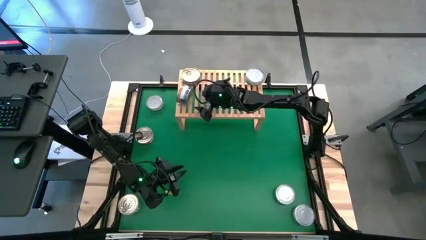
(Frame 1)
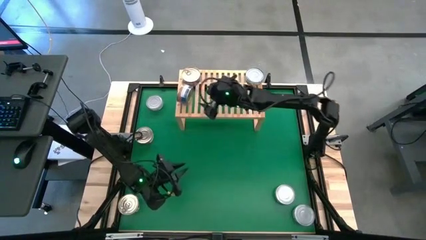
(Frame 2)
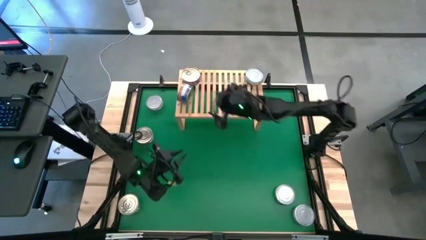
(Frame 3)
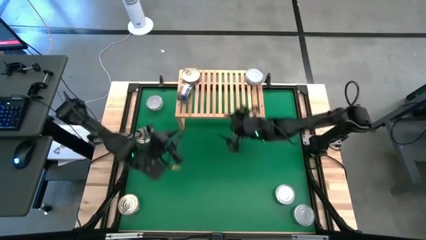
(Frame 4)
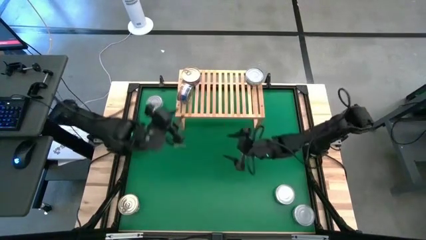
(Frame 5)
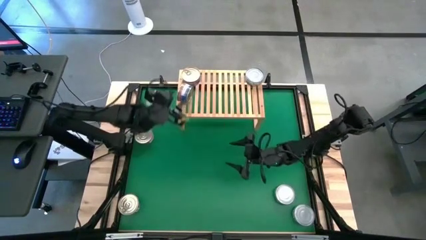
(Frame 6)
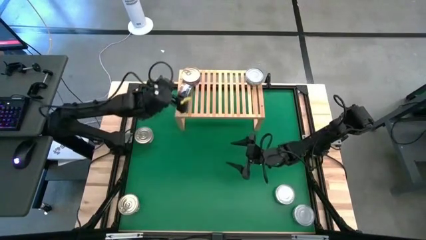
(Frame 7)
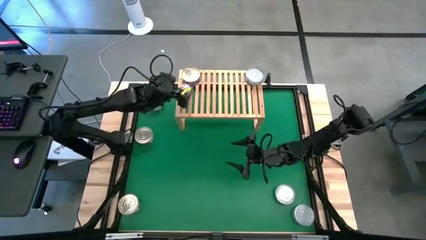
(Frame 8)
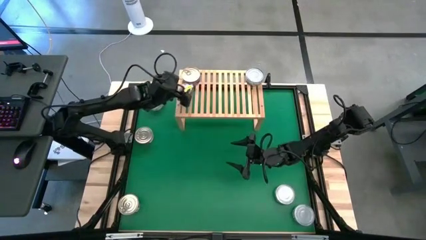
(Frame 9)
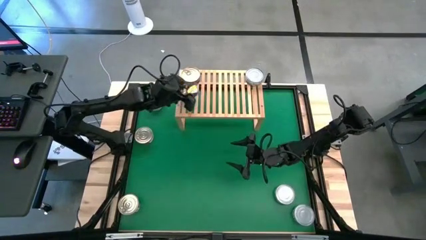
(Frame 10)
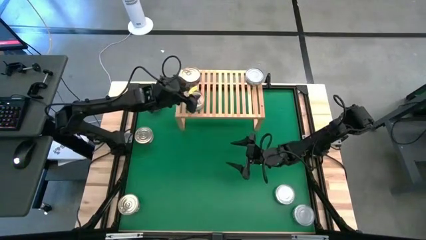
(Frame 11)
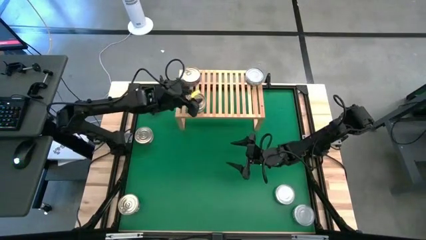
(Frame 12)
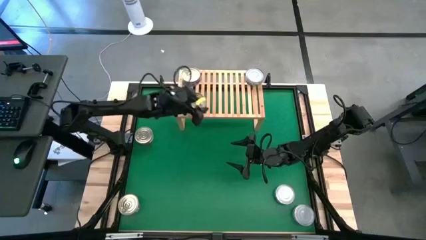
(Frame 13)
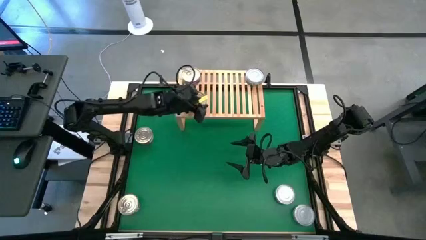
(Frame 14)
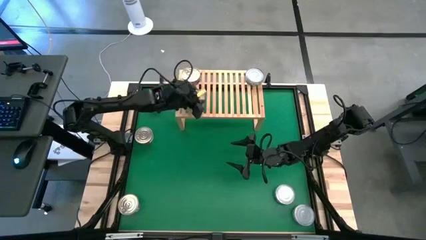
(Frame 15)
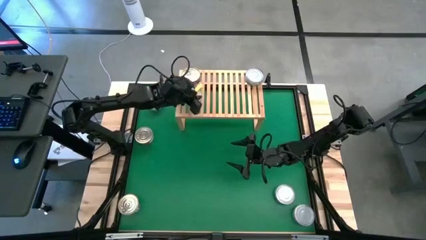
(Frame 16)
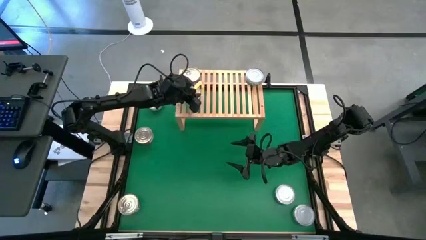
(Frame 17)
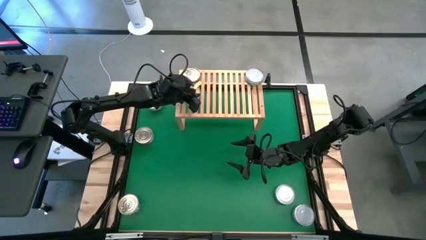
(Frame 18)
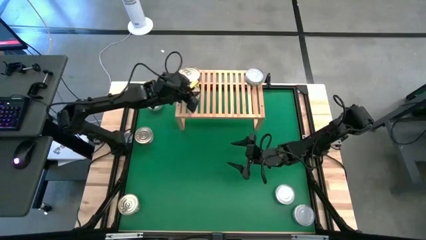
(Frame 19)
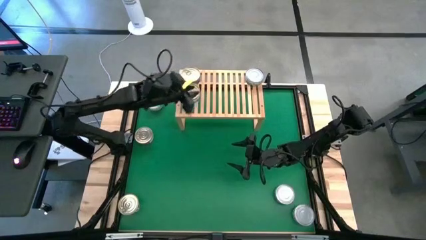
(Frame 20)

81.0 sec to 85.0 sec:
Task: Stack canned seafood by type on shelf
Adjust the blue tuna can

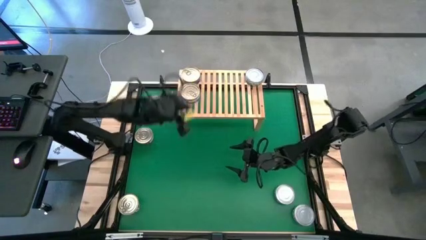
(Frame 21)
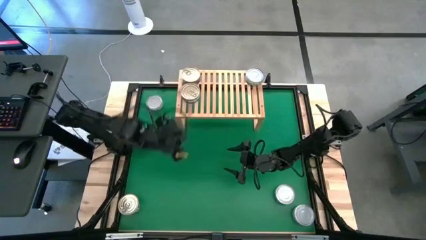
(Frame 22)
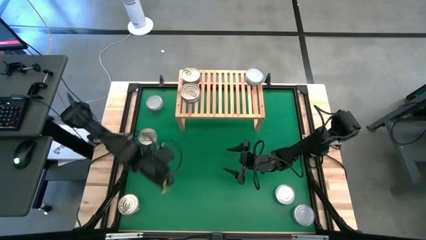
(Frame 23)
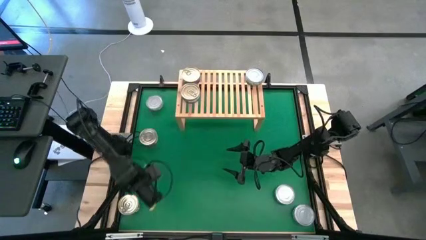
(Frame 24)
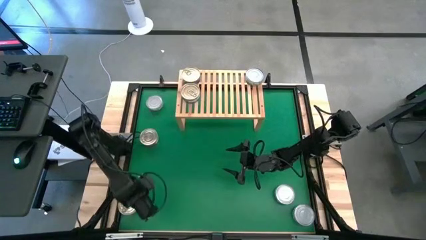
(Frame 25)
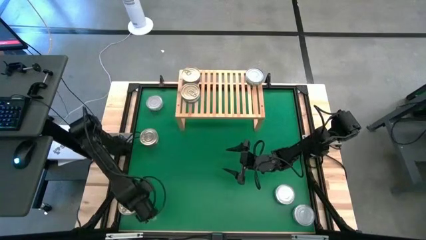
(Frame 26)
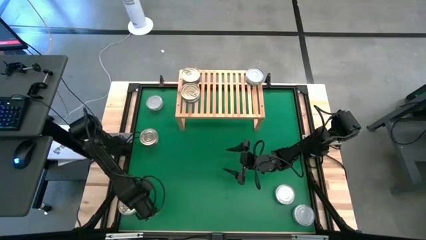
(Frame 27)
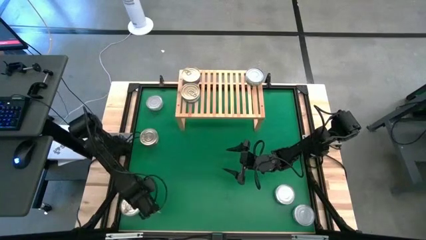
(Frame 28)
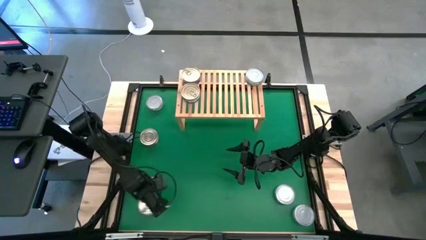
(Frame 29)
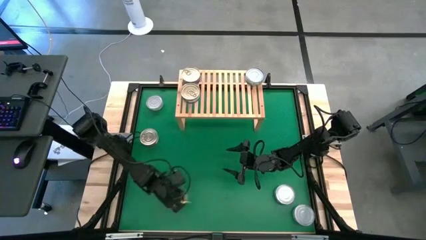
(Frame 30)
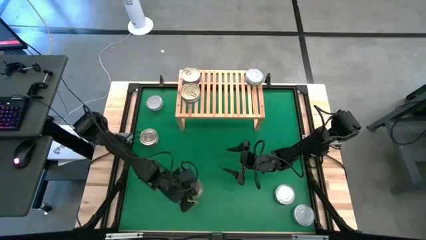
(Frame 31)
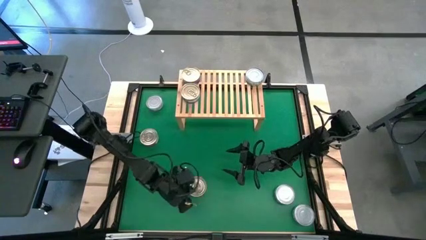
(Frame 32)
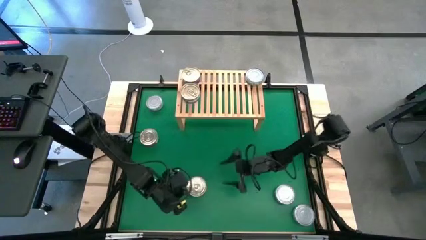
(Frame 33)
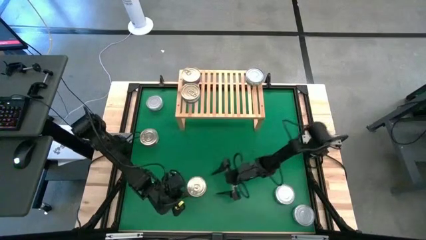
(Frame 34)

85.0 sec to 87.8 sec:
Move the bottom left blue tuna can to the bottom middle of the table

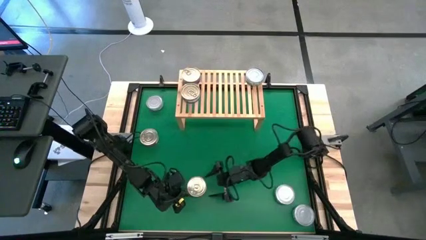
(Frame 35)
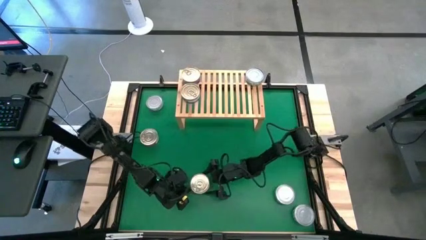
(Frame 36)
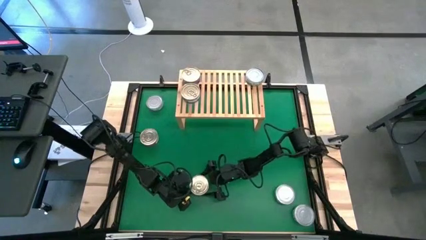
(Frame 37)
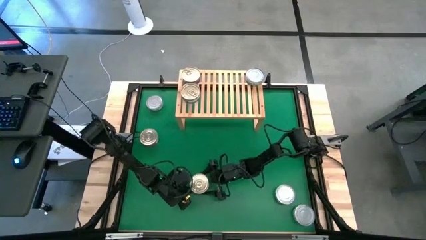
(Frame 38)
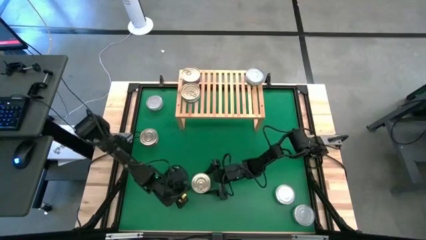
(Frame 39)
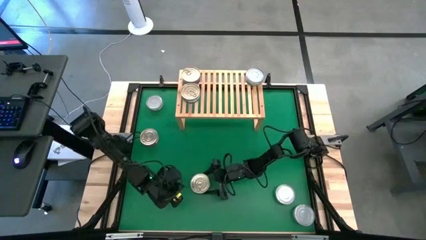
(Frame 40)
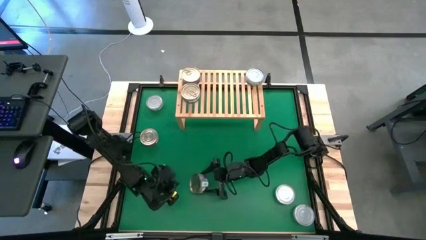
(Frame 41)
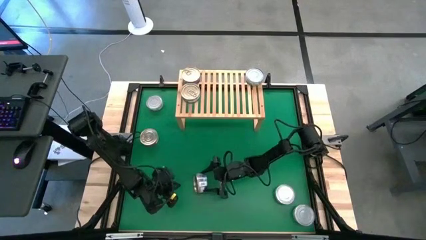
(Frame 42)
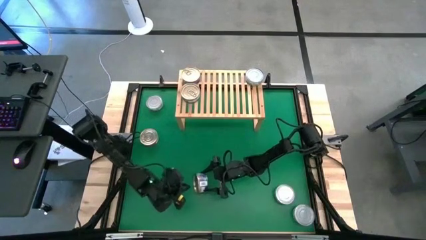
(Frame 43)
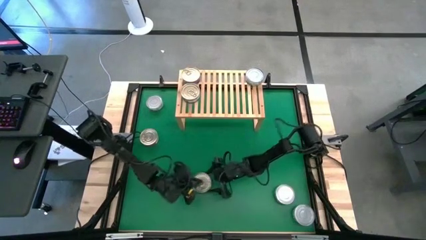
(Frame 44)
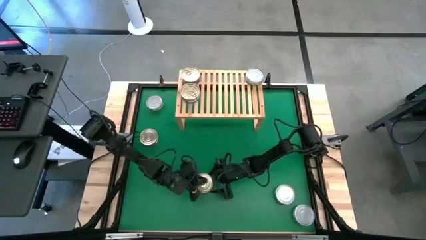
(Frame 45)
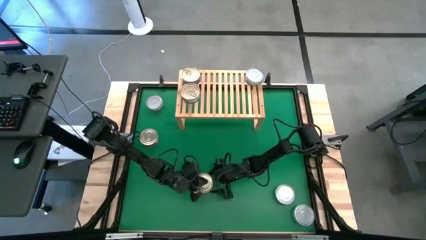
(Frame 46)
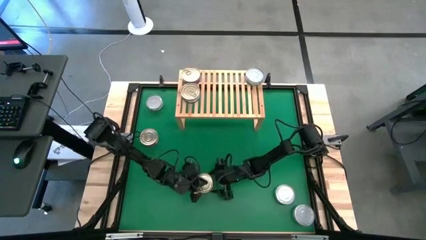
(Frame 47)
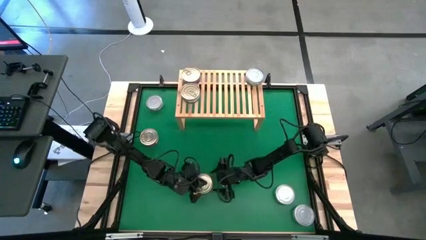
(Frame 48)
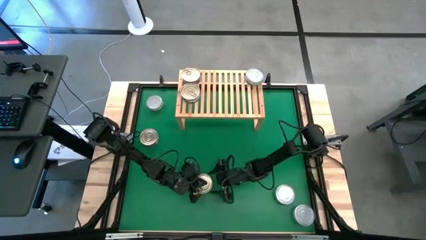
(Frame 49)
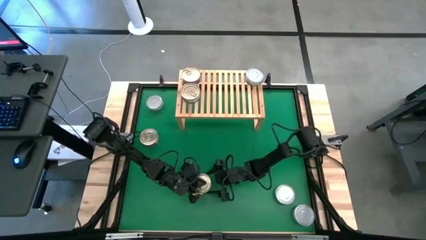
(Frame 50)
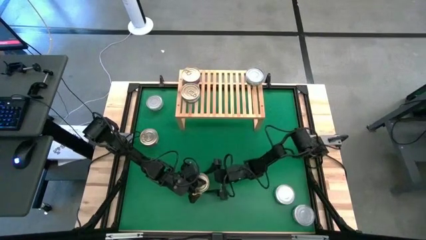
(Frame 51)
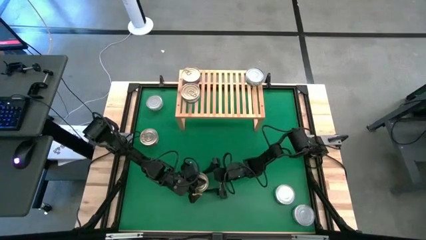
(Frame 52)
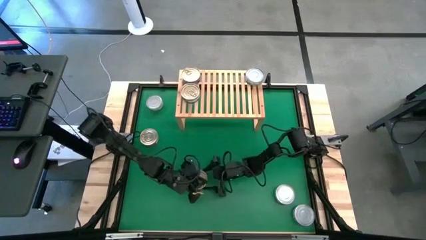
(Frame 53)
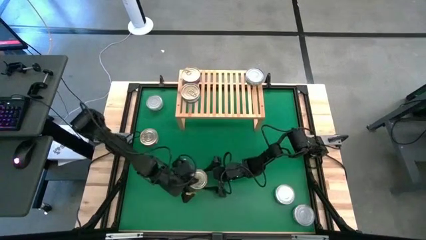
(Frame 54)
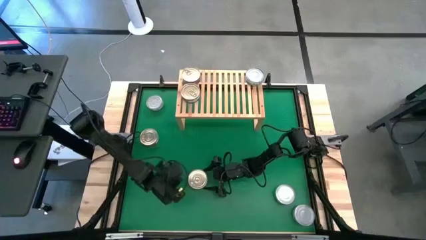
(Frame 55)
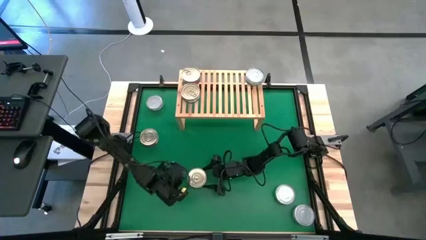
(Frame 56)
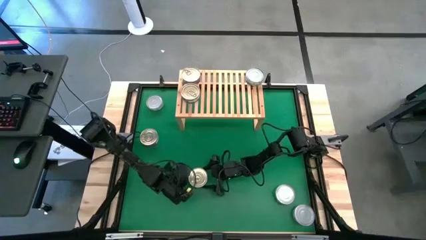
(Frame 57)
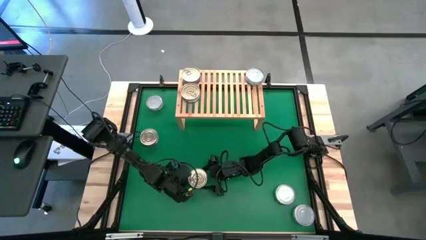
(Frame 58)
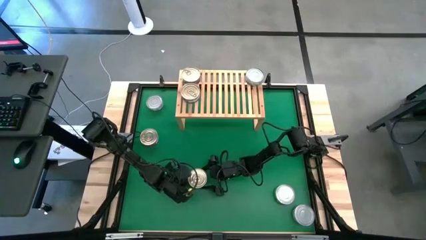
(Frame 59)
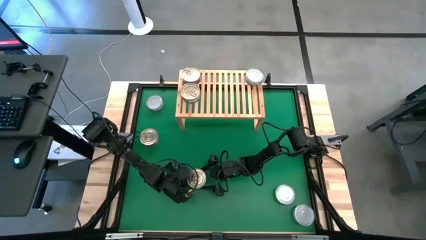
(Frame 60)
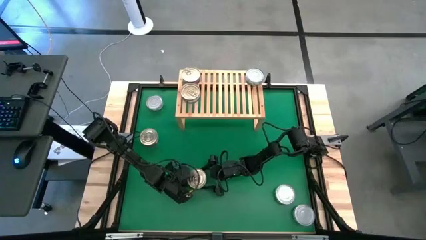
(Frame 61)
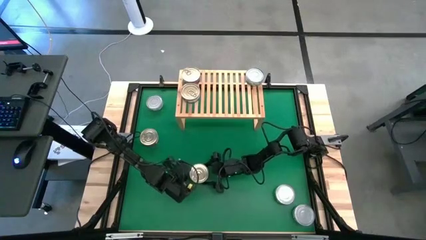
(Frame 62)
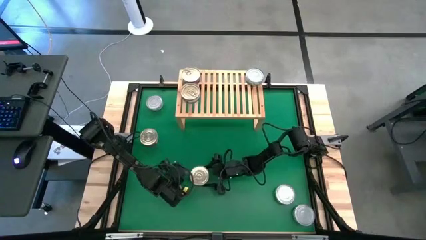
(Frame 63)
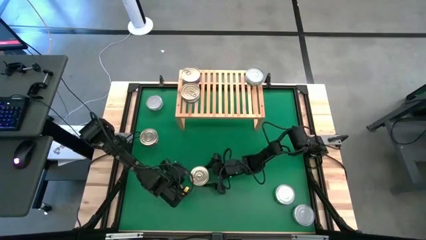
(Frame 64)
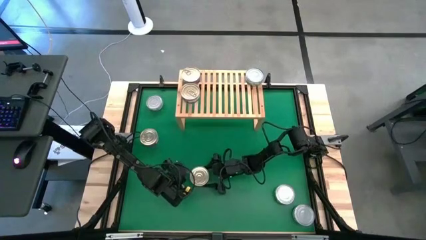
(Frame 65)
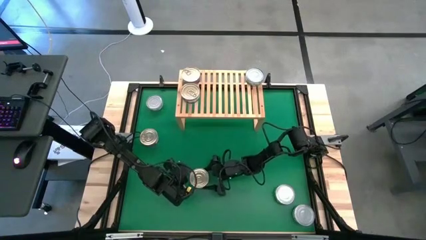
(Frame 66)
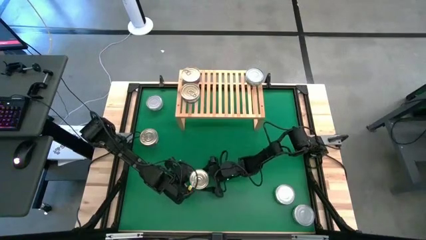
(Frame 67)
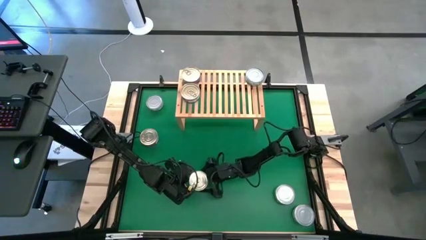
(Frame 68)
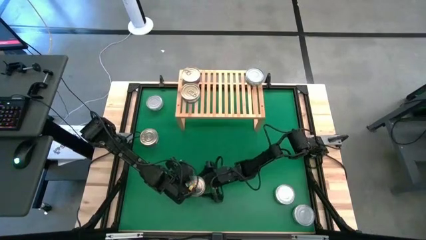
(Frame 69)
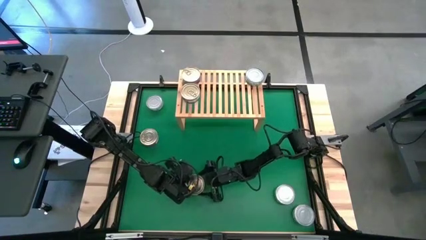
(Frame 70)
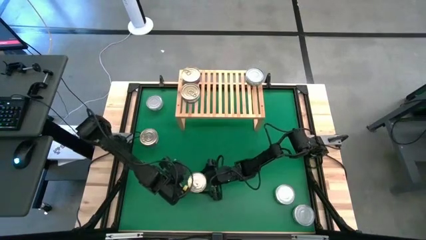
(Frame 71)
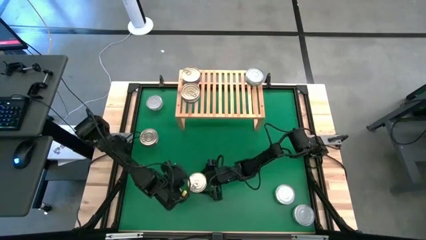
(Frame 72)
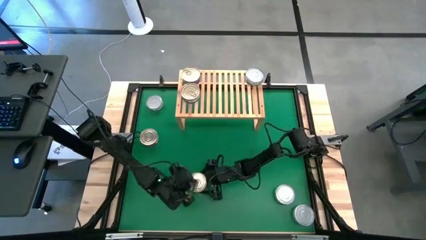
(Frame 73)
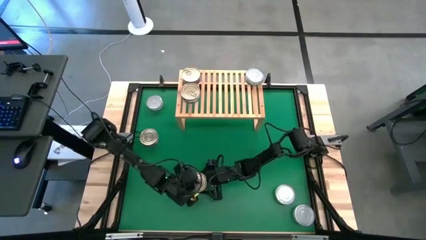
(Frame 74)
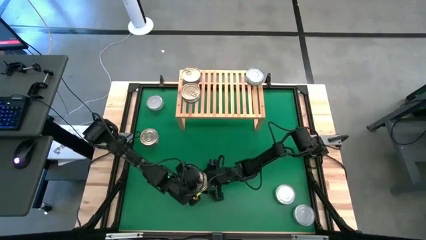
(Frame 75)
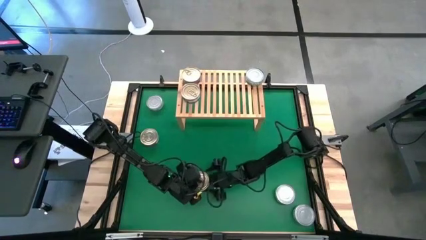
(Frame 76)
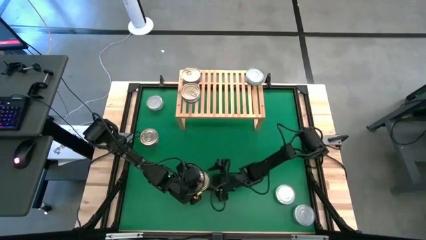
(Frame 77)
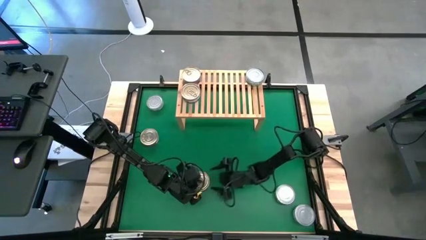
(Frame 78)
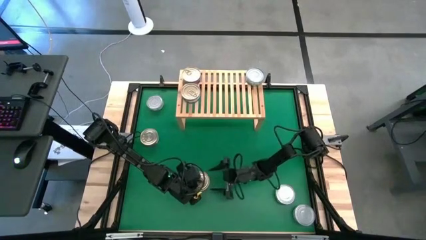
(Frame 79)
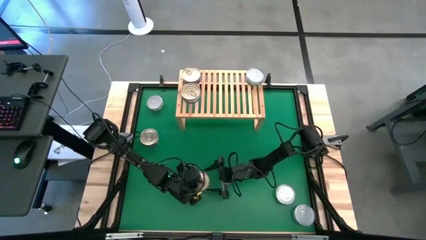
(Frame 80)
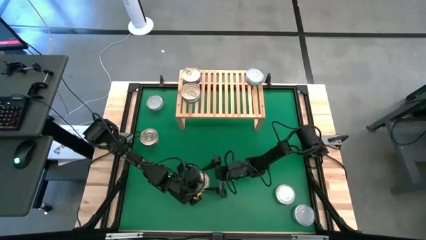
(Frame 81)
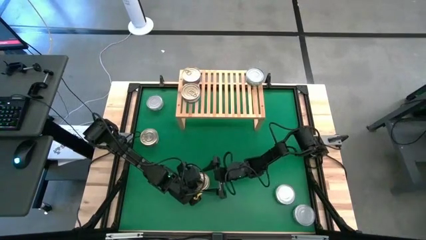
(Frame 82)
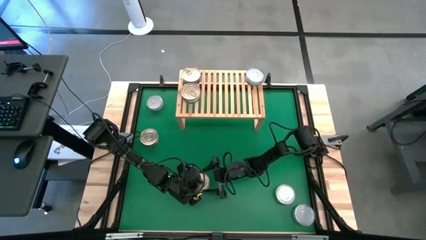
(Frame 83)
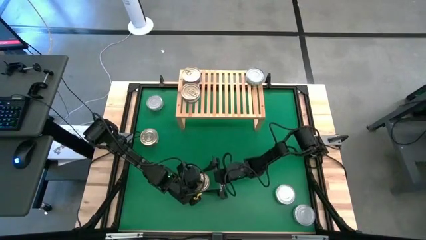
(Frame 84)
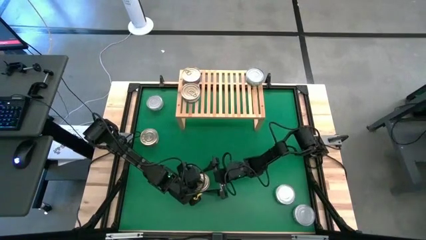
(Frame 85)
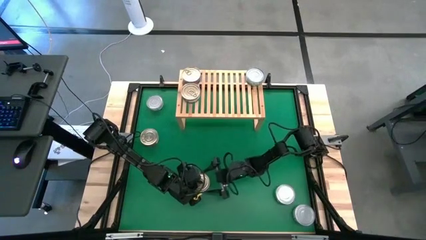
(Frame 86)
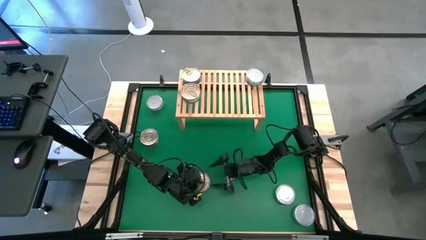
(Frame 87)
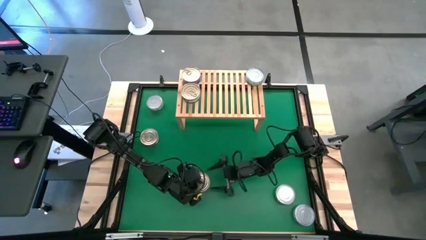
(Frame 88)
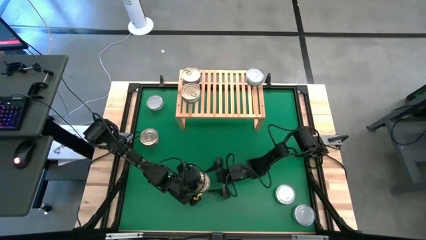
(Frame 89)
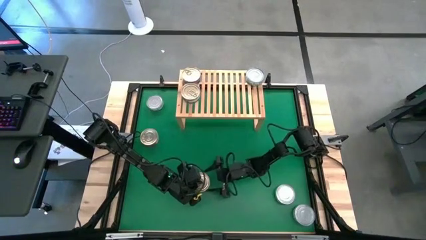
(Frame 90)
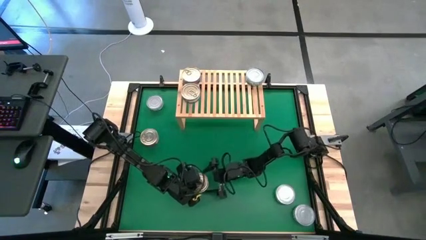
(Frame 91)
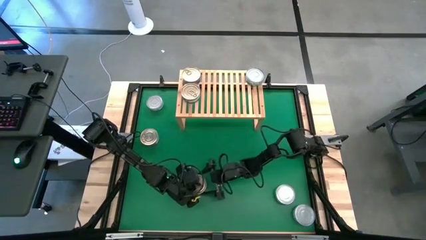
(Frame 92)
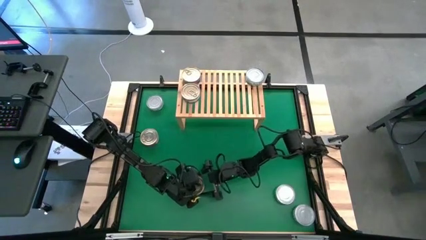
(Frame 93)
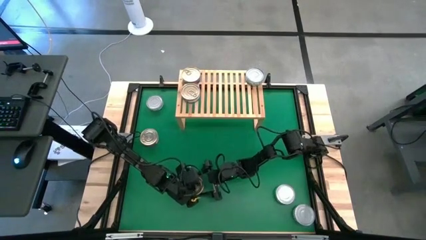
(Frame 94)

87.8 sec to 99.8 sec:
Put the bottom middle blue tuna can on the shelf aligned with the other blue tuna can
